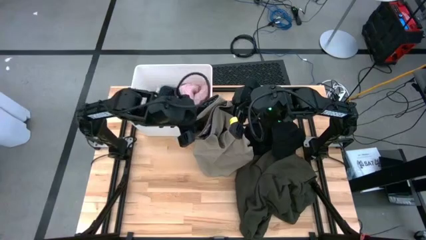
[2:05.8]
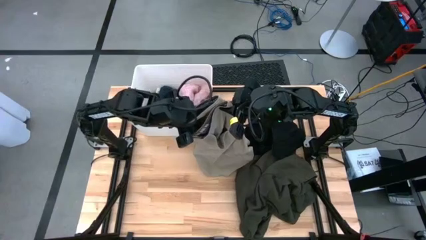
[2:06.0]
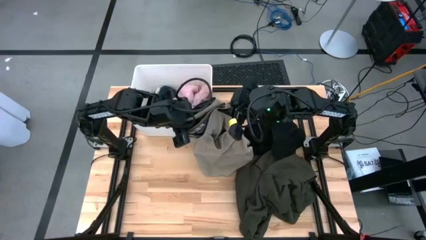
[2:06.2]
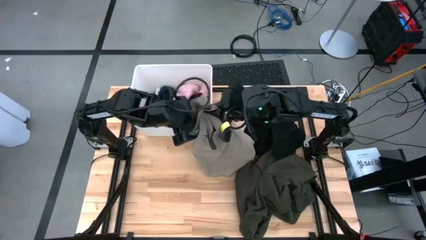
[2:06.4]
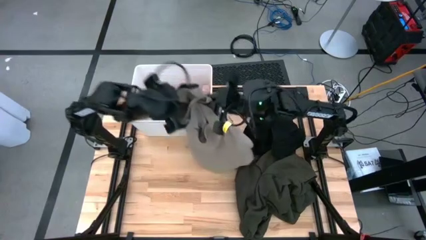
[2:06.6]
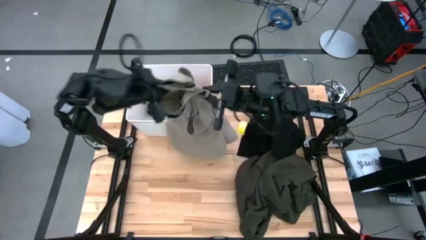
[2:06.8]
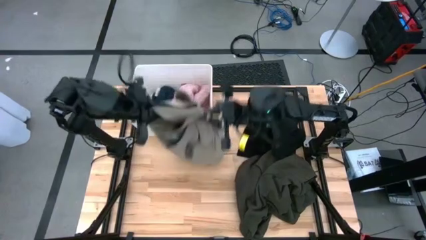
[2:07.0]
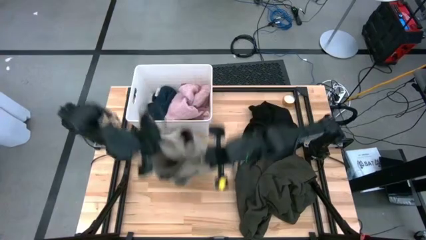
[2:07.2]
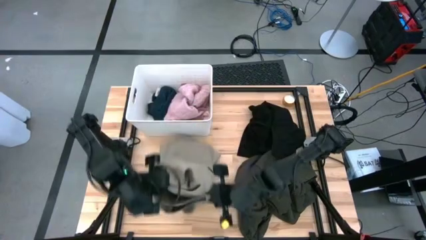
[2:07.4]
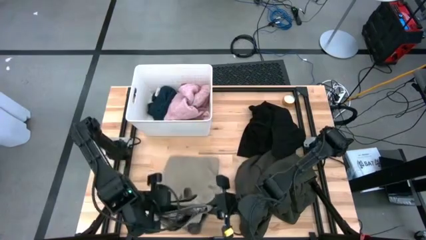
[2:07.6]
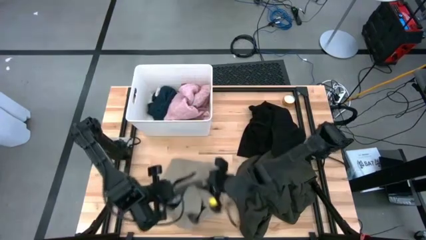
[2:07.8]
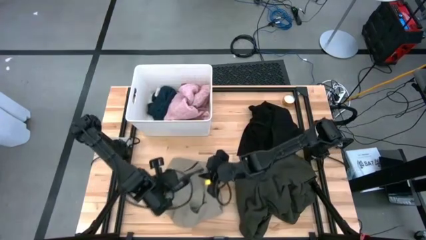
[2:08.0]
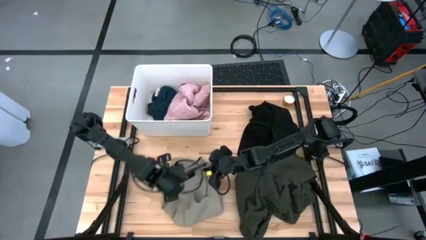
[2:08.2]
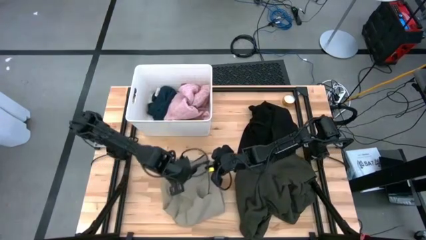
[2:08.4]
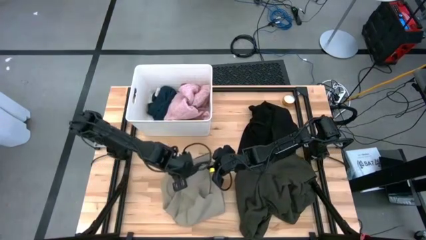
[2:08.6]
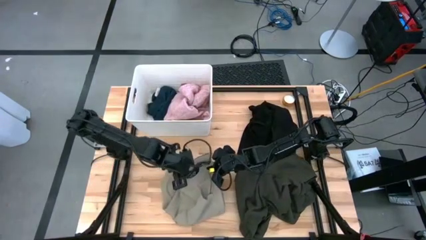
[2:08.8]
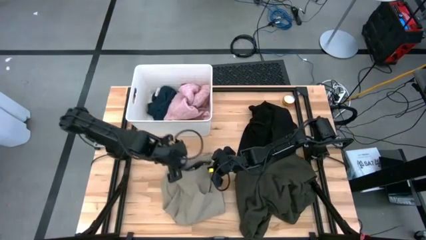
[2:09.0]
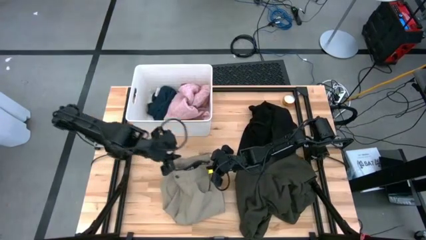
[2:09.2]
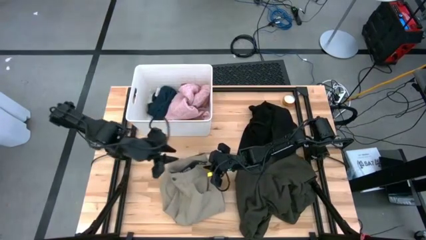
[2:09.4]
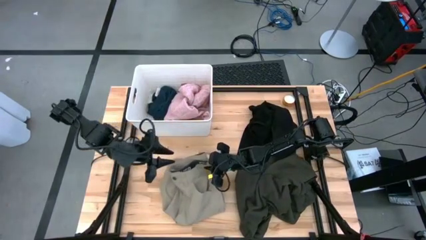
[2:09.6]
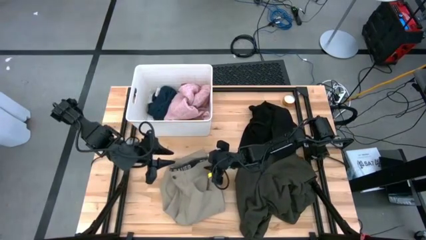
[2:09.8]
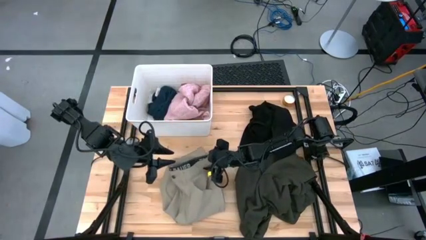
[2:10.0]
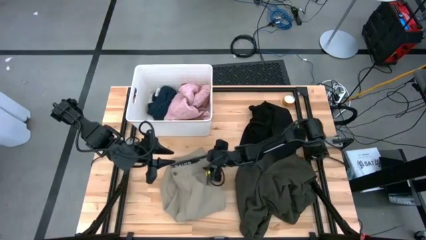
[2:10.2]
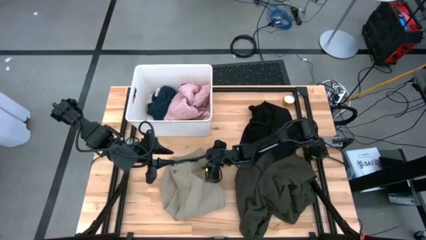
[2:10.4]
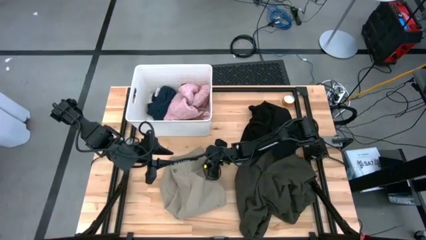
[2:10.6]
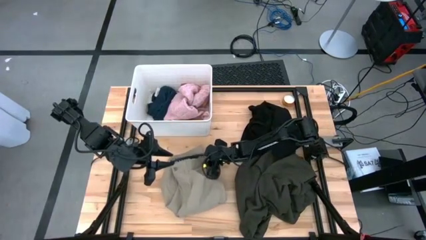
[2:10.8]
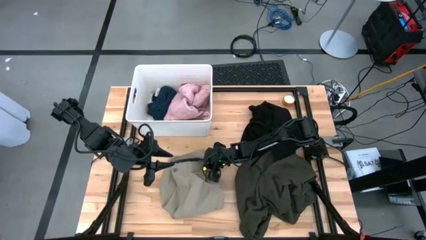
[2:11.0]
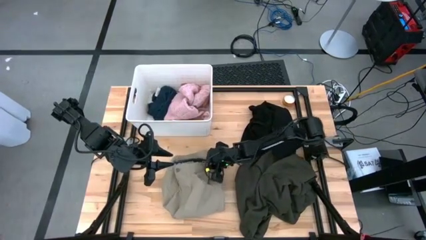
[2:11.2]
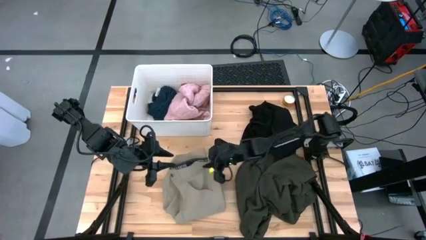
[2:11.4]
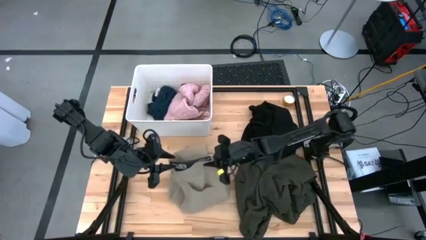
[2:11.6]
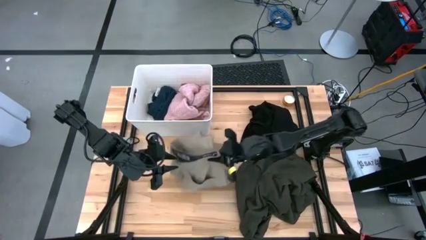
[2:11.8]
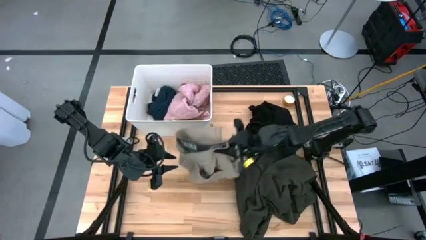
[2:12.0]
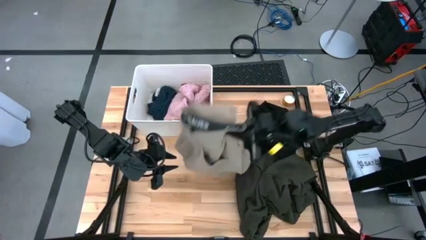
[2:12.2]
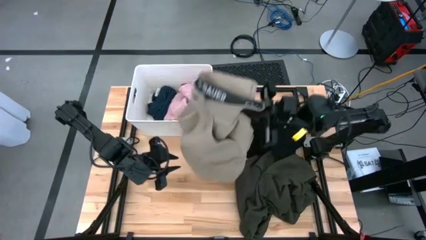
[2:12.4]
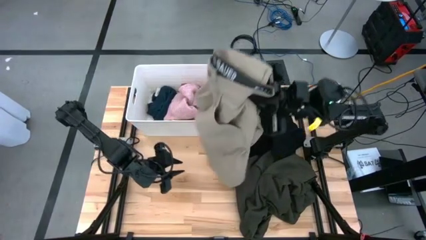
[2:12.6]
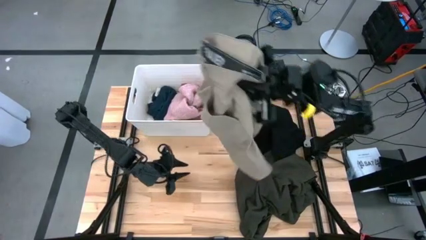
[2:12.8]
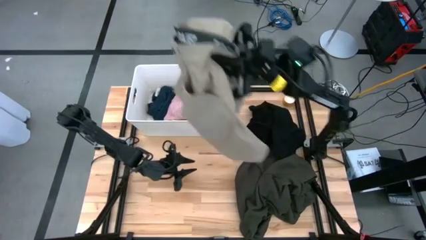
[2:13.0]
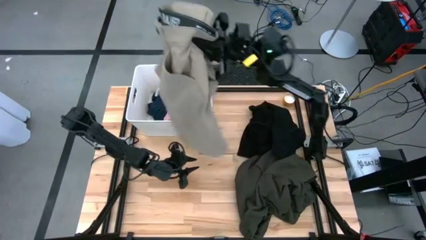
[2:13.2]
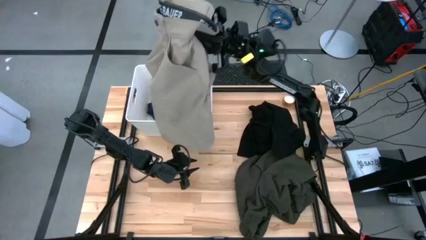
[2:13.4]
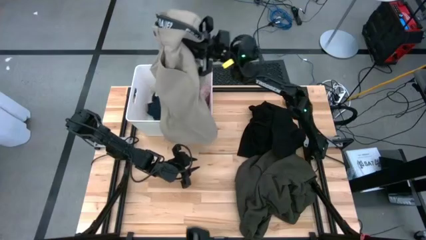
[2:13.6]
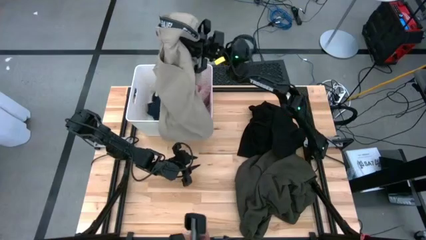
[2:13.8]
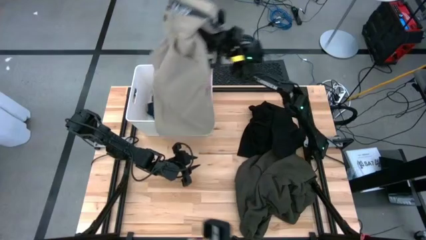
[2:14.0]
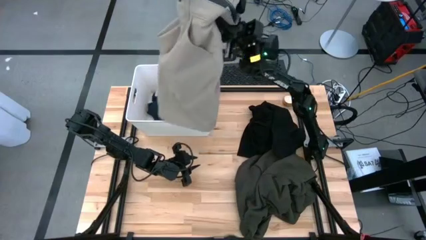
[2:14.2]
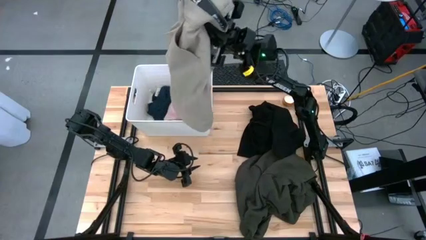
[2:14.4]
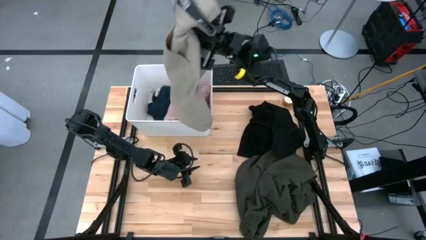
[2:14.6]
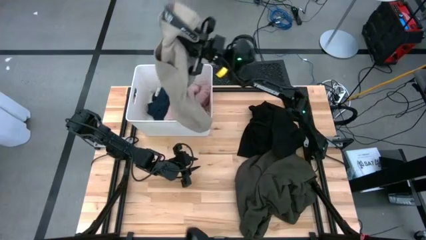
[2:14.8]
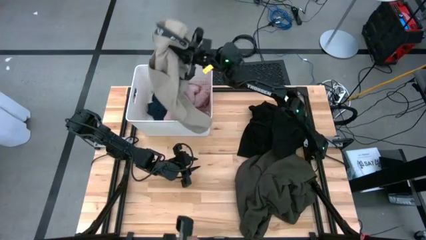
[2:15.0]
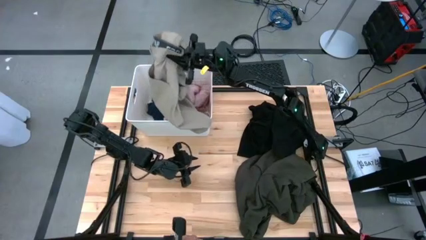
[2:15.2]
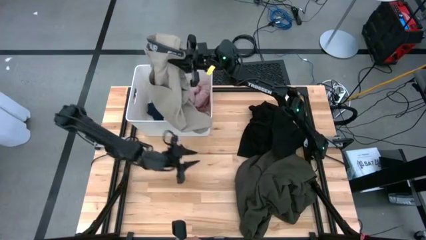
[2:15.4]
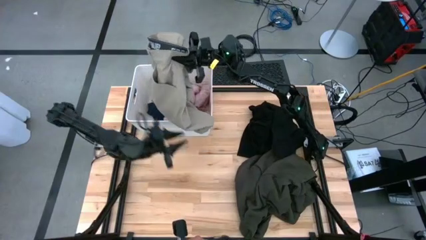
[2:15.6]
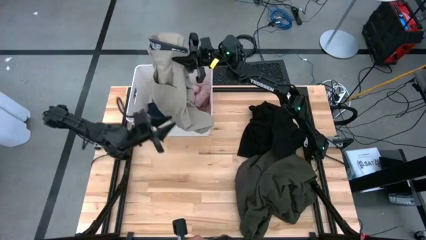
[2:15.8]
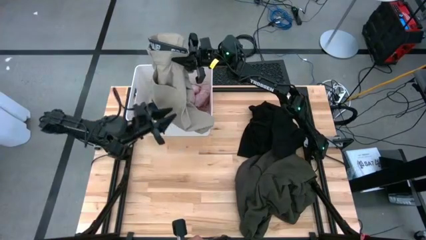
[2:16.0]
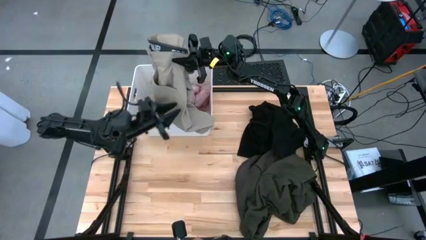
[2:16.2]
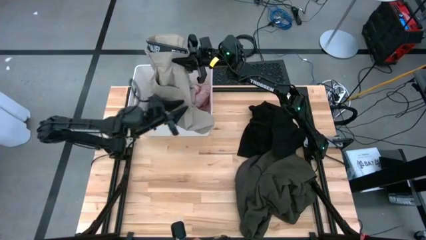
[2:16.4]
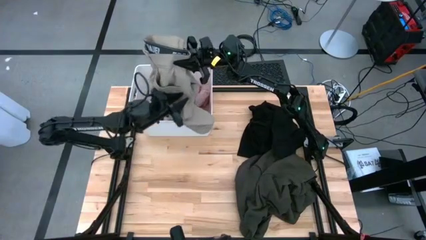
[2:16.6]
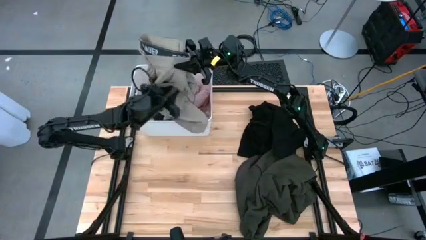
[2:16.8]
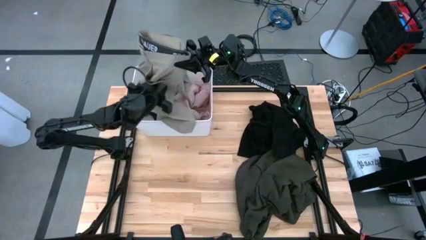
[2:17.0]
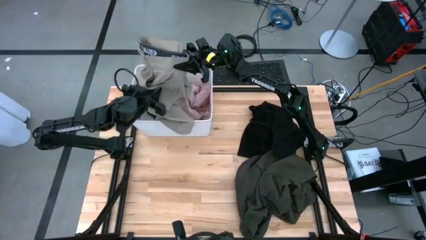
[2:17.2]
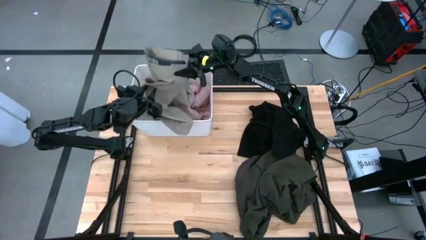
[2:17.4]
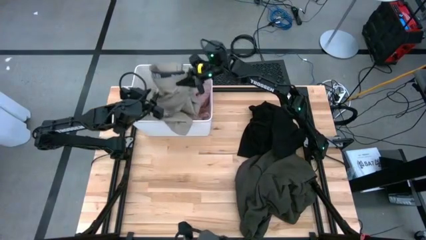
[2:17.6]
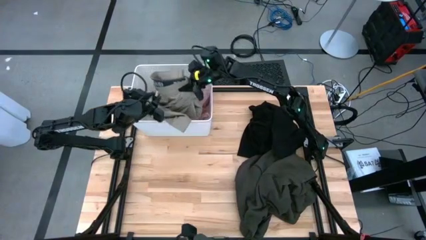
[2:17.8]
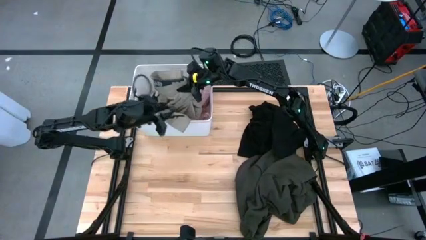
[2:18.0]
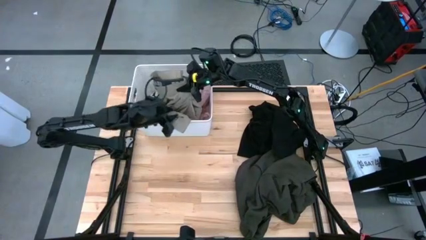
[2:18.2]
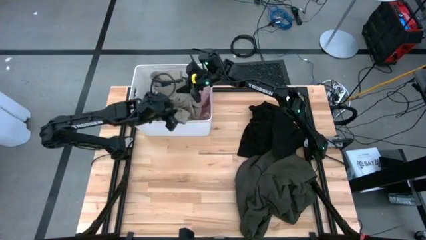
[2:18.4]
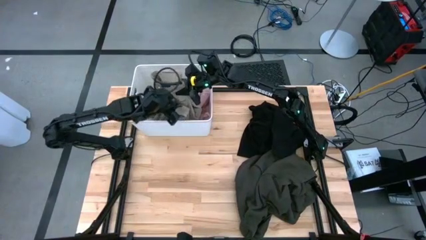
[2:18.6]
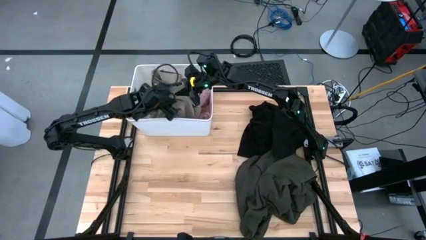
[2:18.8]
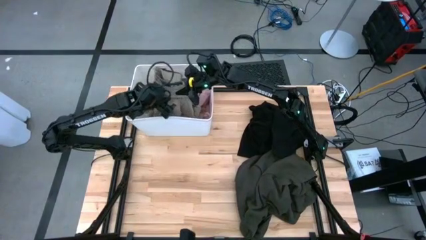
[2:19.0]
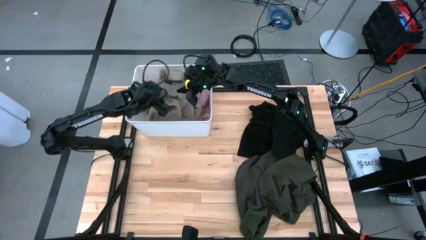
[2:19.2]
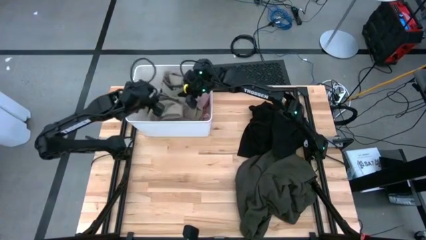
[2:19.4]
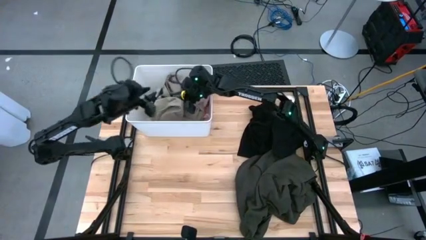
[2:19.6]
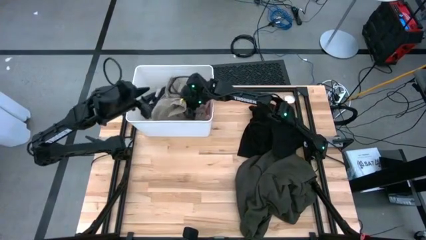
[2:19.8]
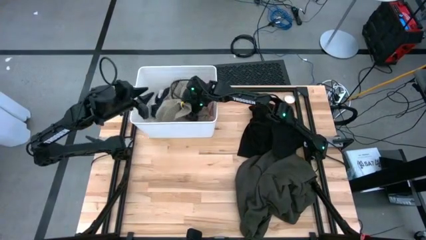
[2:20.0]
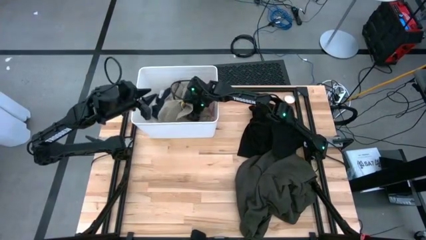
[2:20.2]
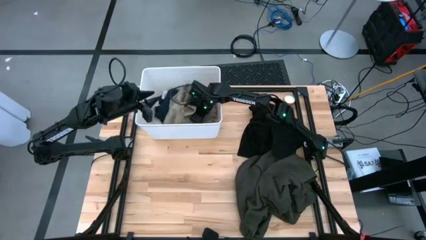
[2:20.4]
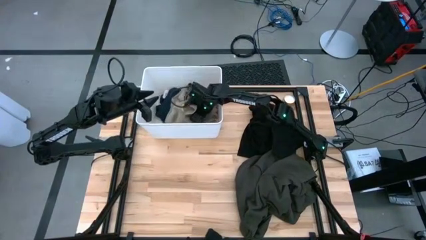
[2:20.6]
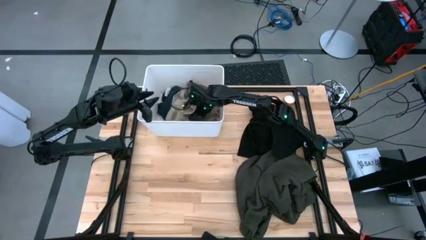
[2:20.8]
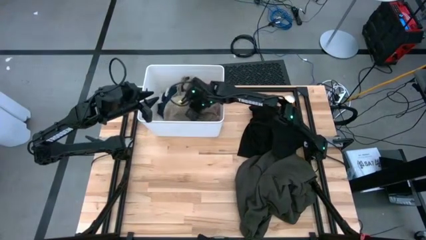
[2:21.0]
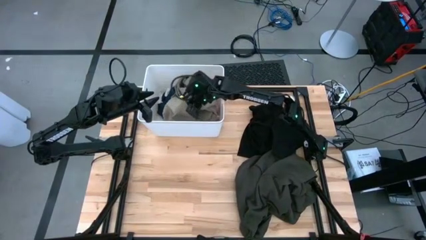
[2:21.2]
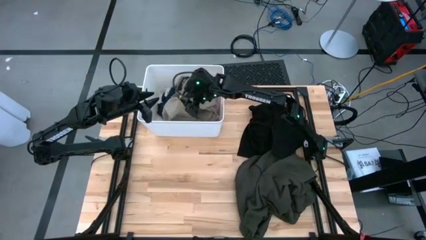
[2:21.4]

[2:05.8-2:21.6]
Task: Sort clothes
Put the brown shorts into the white laundry bin
